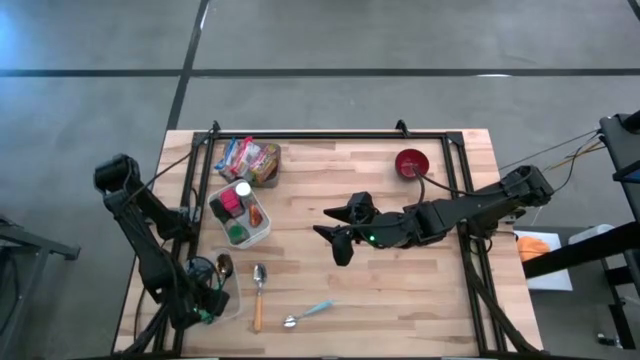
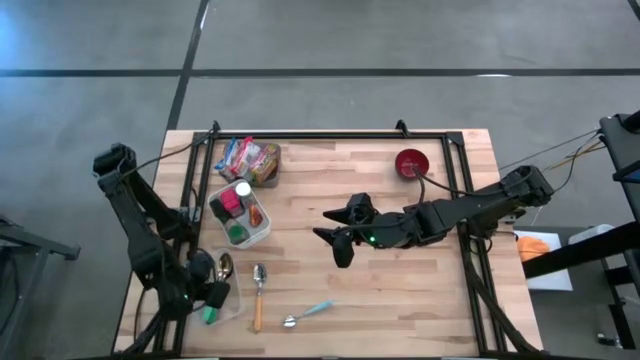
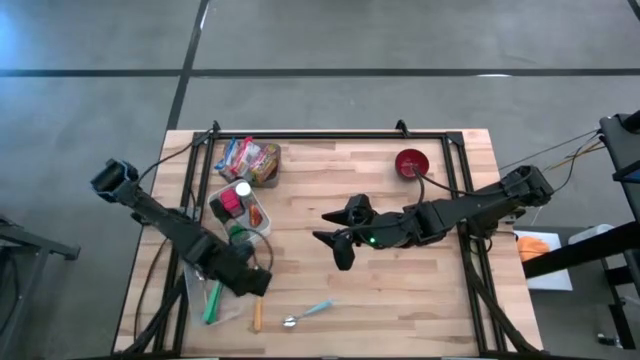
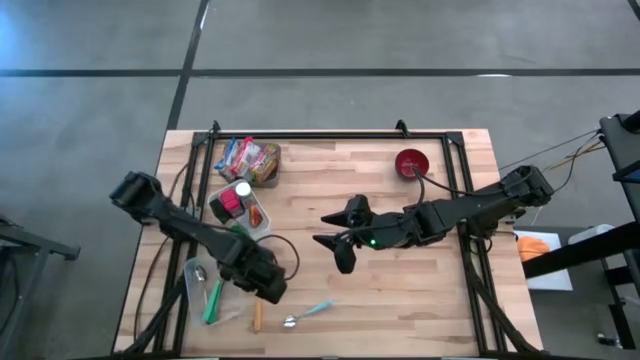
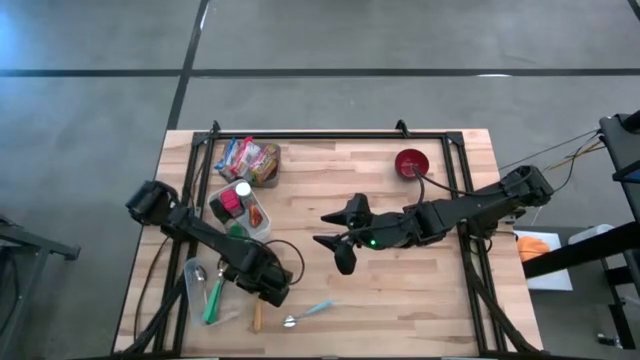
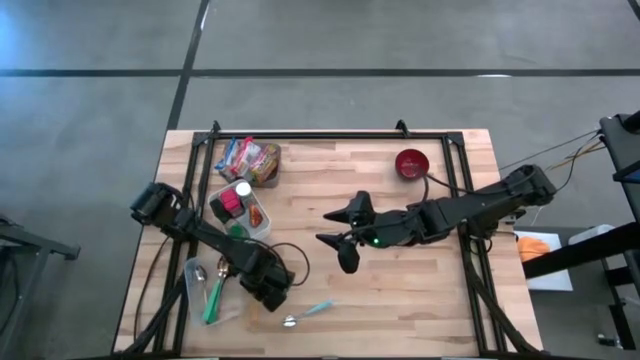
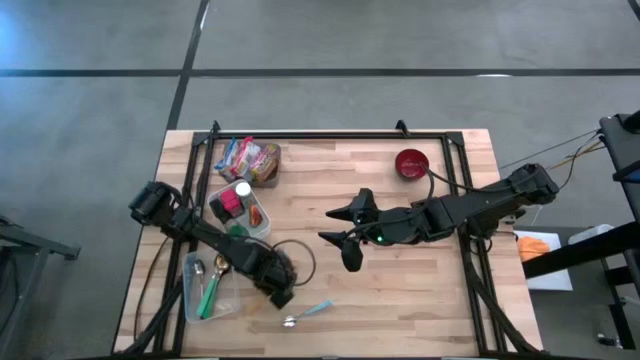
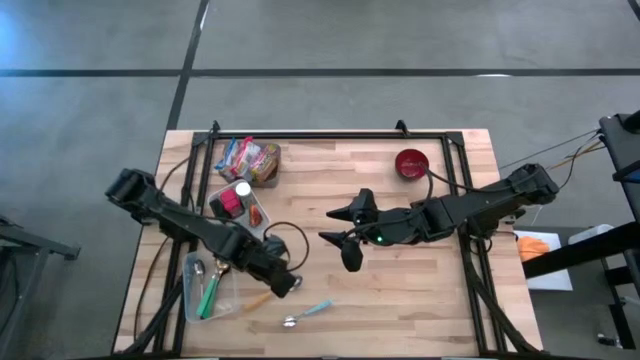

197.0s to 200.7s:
Put the yellow spoon into the transparent bin

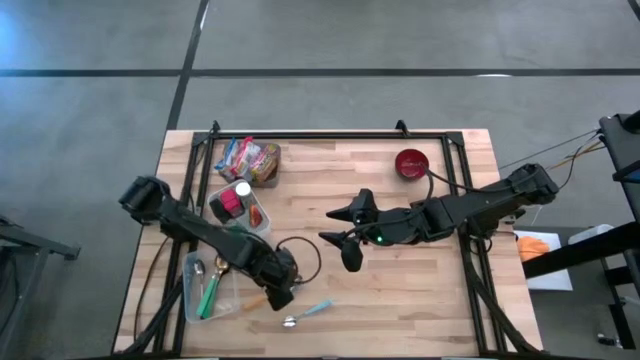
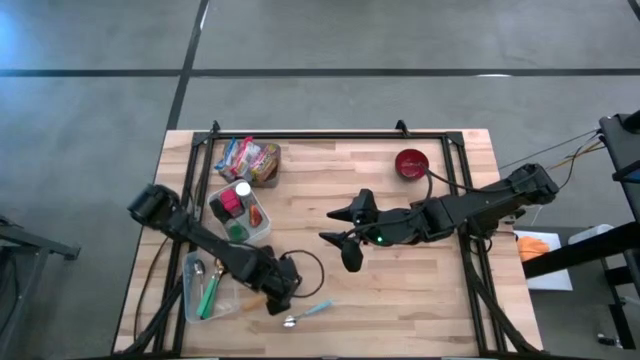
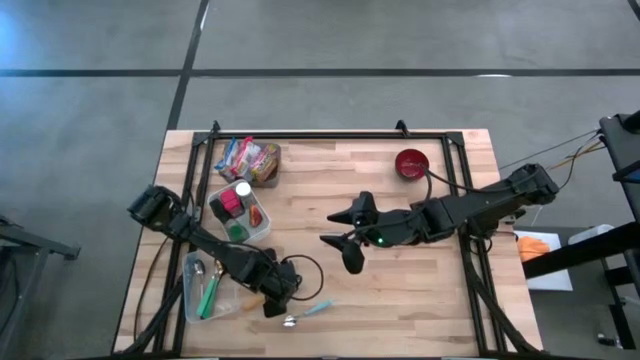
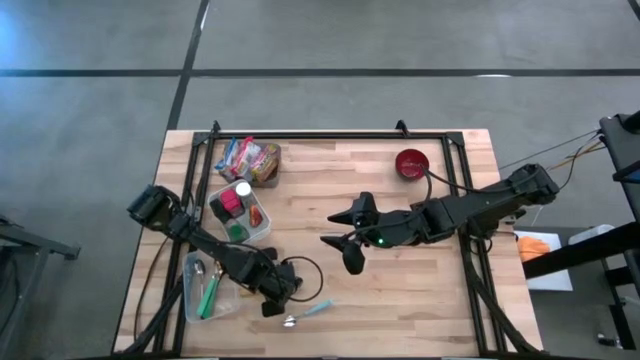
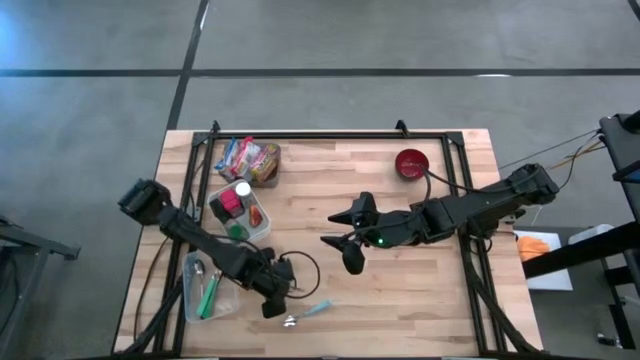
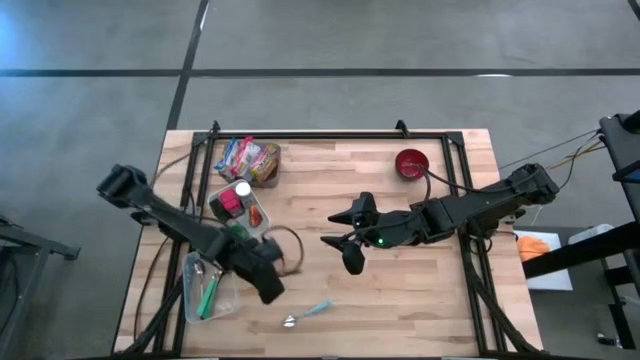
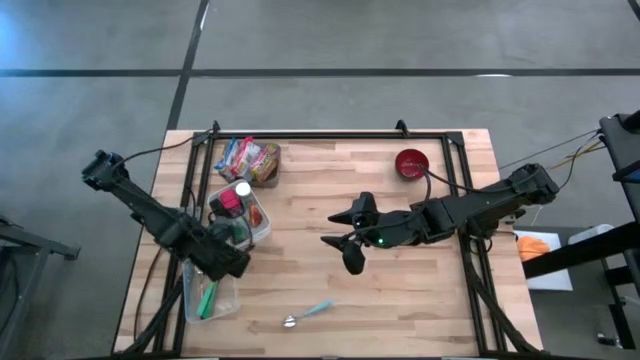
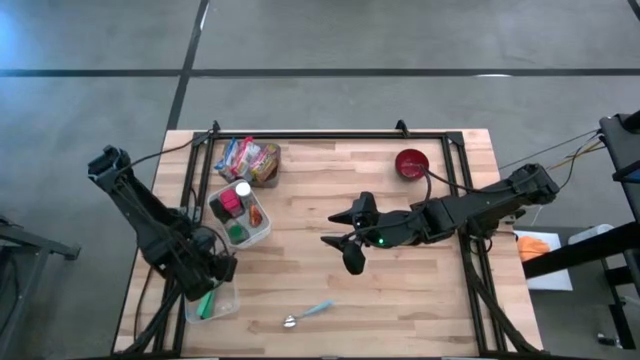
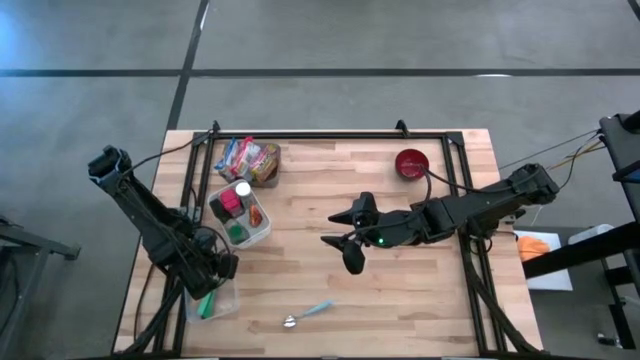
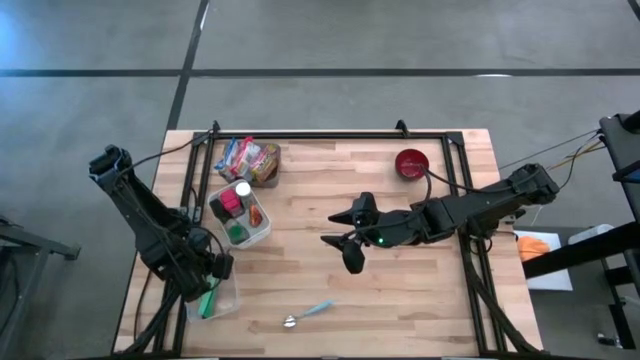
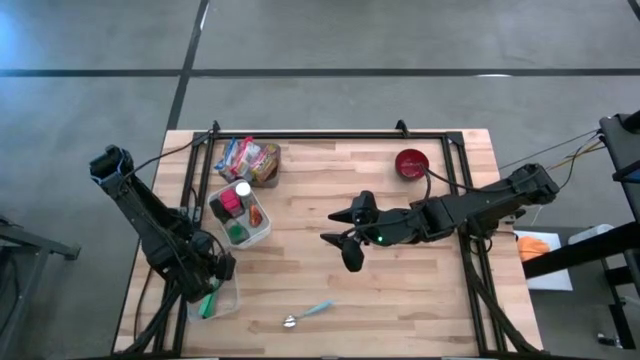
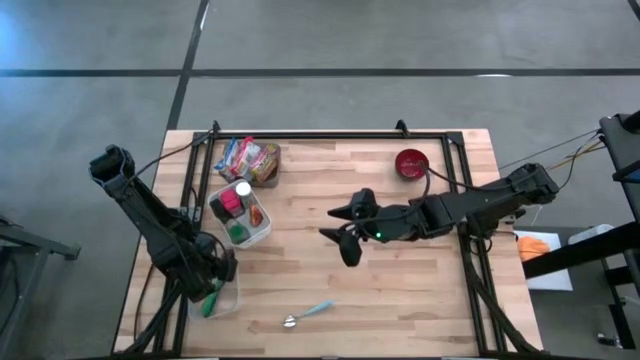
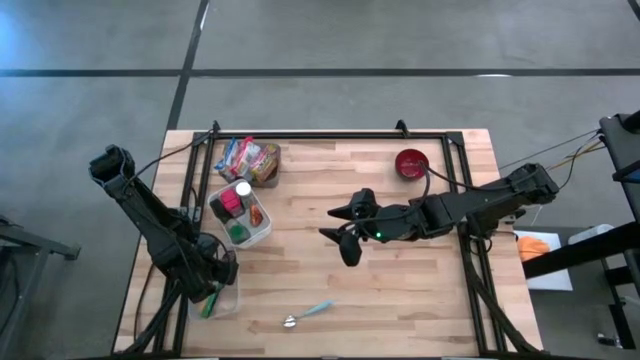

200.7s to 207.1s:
Put the yellow spoon into the transparent bin

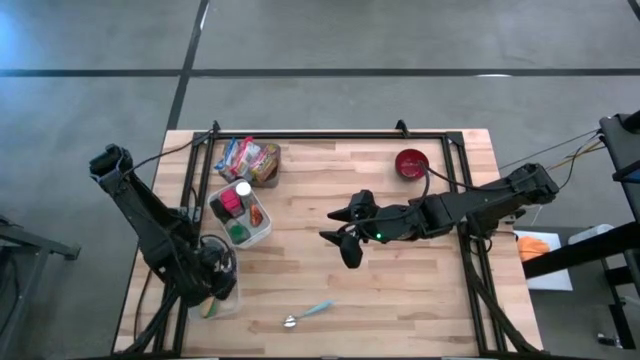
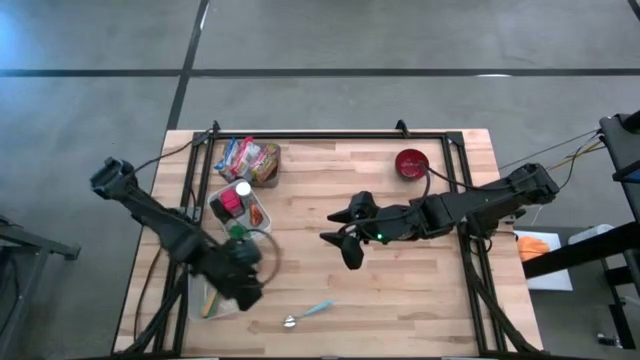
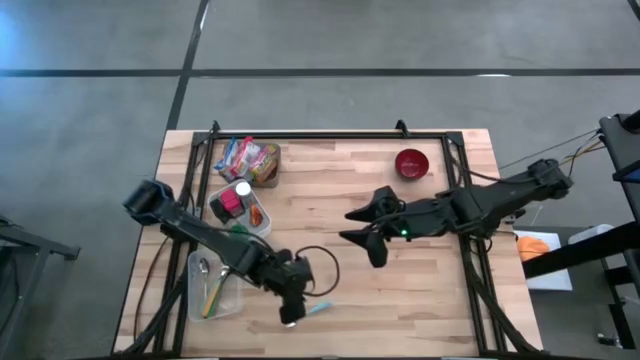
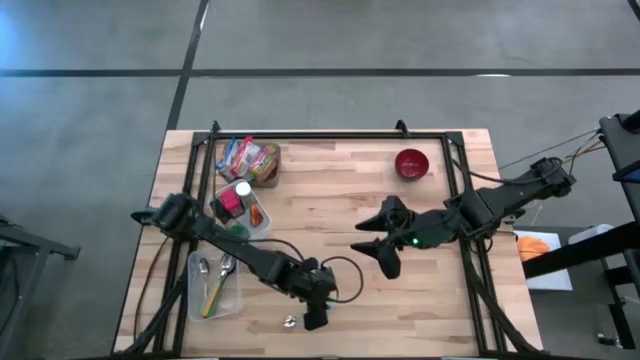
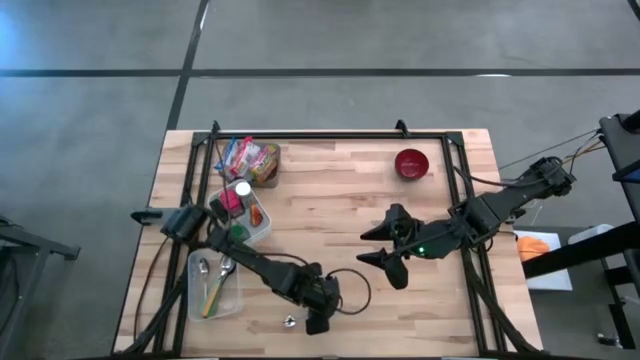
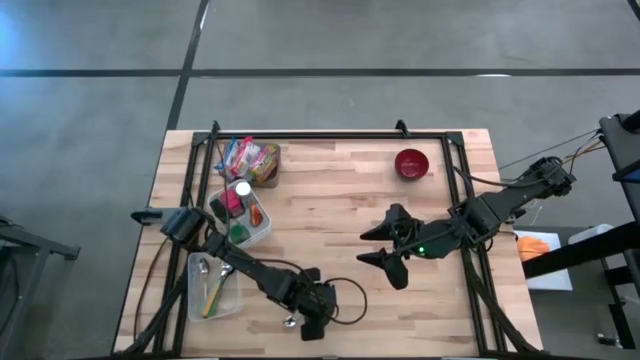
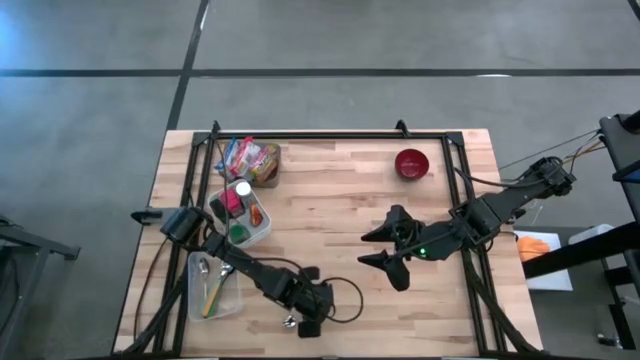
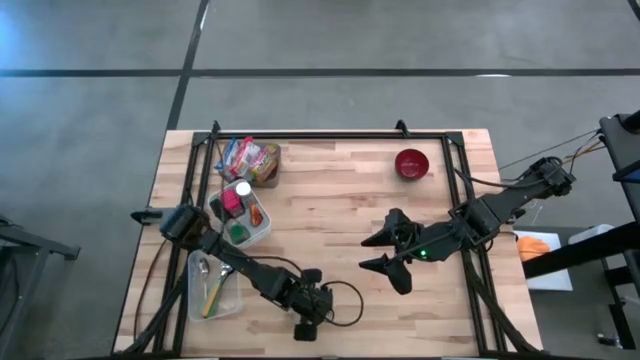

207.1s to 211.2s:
Put the blue spoon into the transparent bin

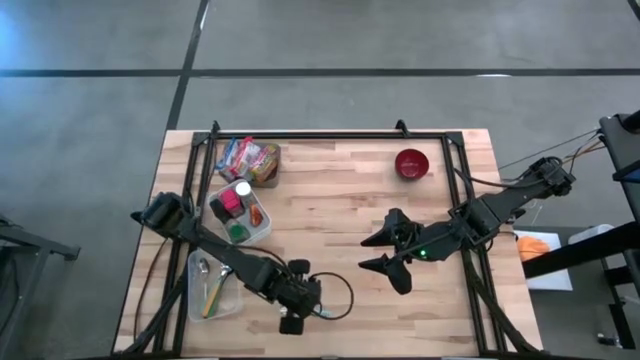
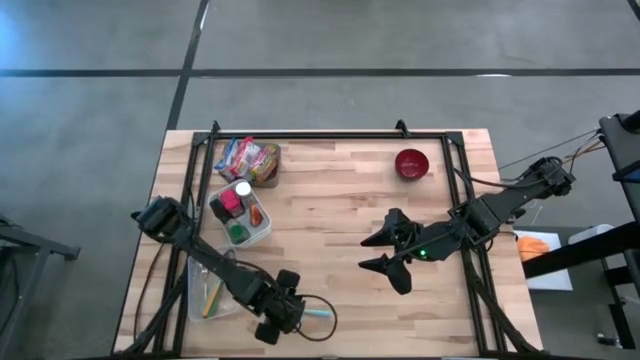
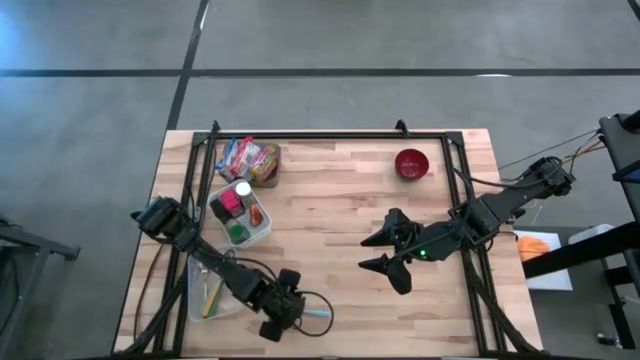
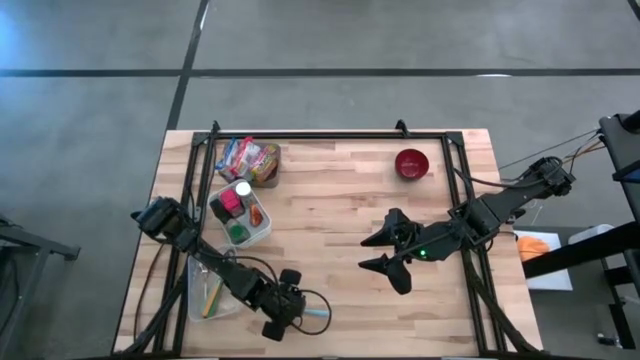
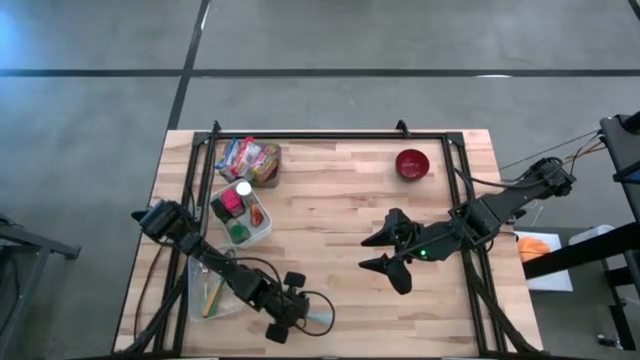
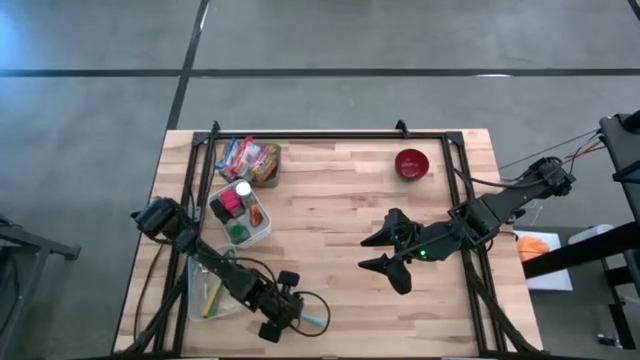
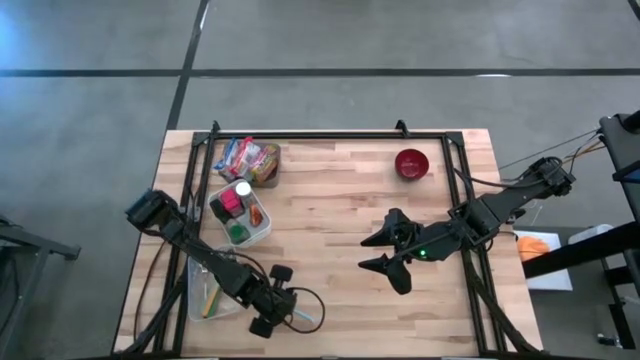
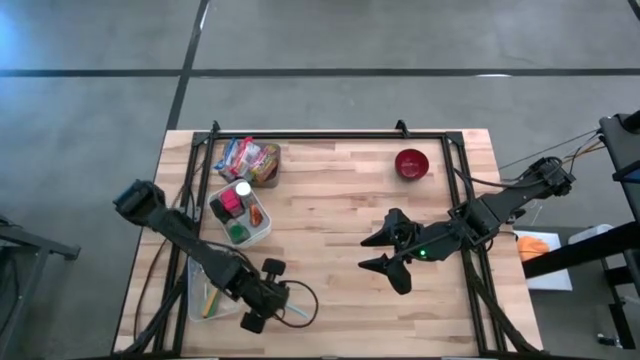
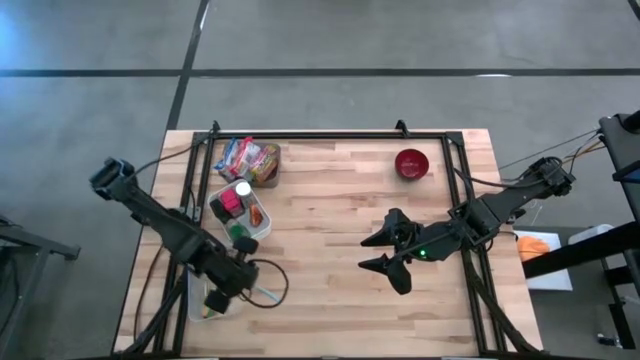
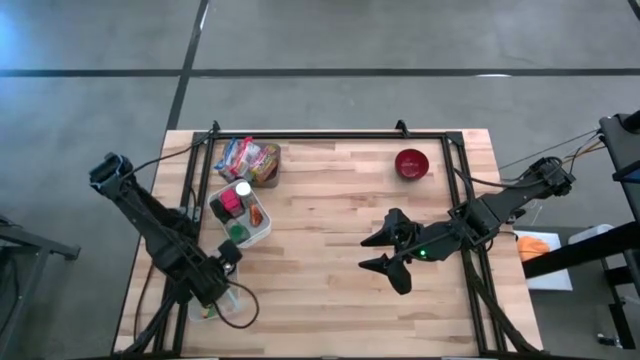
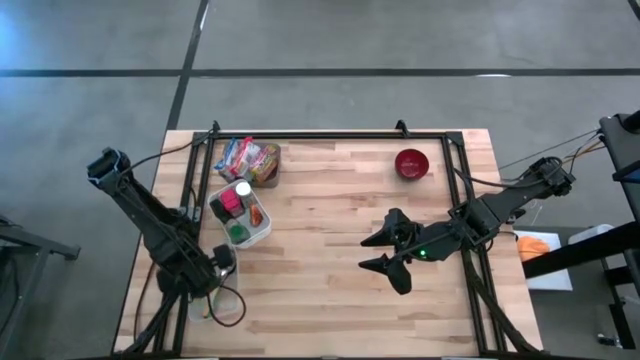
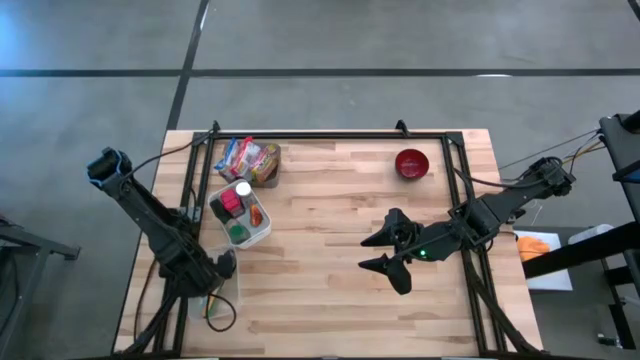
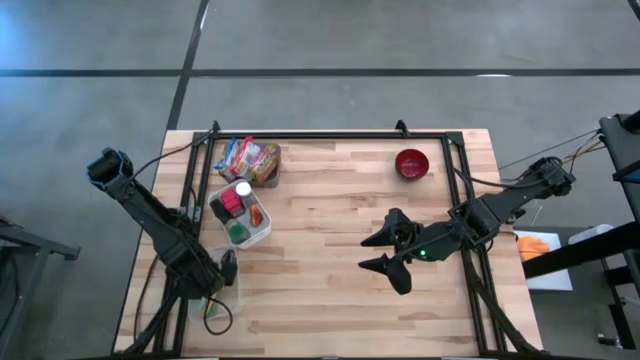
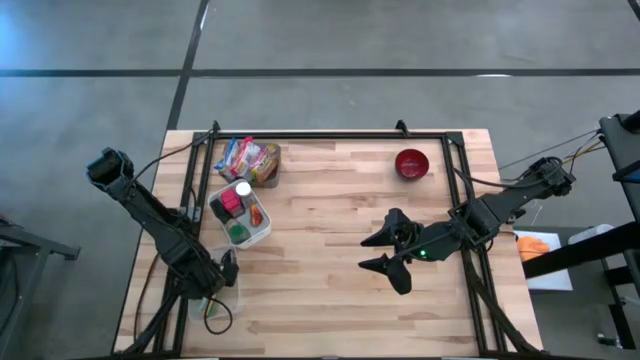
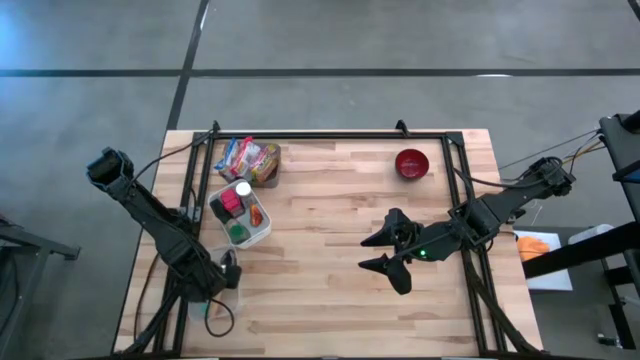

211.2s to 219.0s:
Put the blue spoon into the transparent bin
